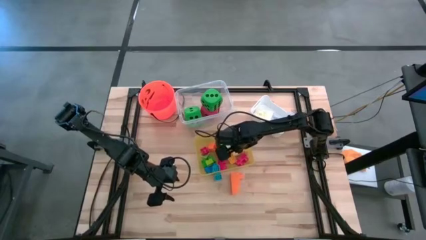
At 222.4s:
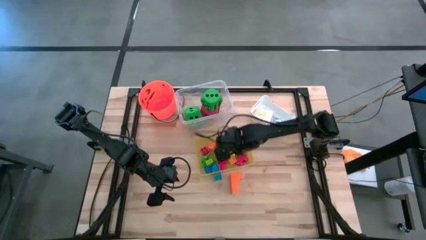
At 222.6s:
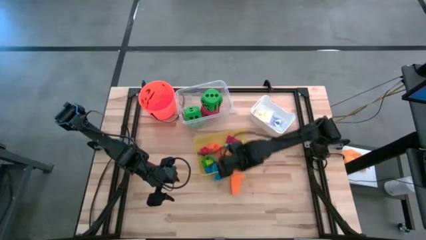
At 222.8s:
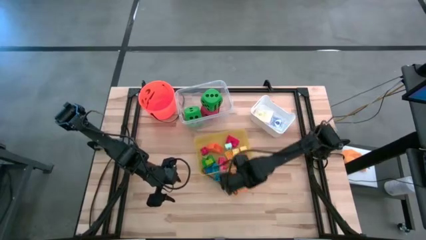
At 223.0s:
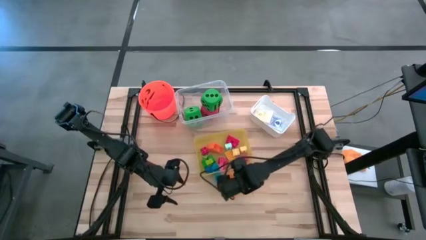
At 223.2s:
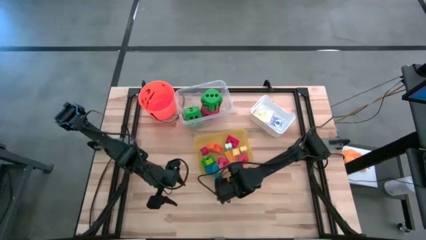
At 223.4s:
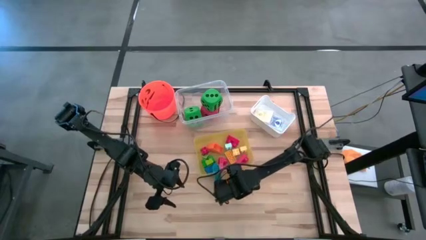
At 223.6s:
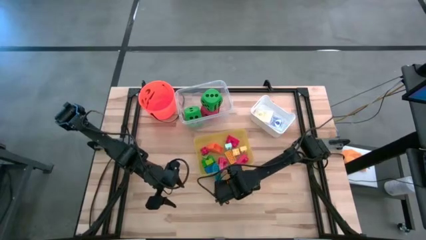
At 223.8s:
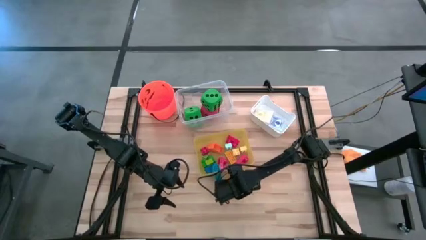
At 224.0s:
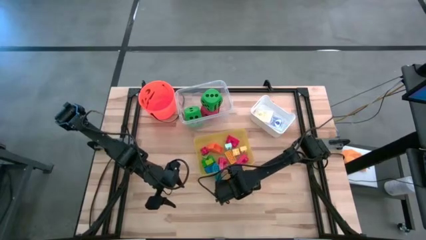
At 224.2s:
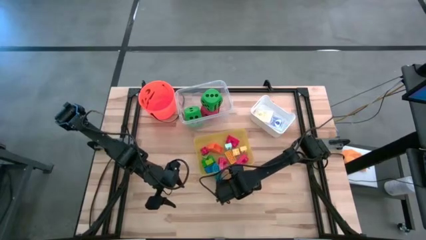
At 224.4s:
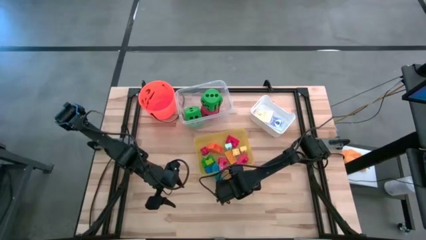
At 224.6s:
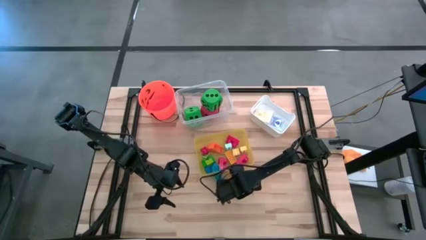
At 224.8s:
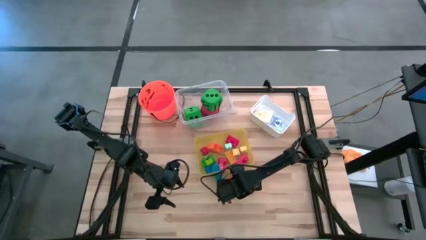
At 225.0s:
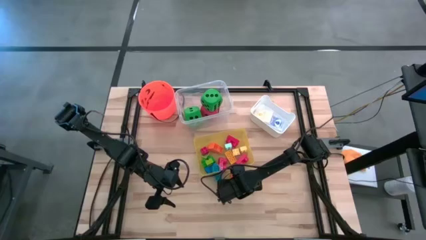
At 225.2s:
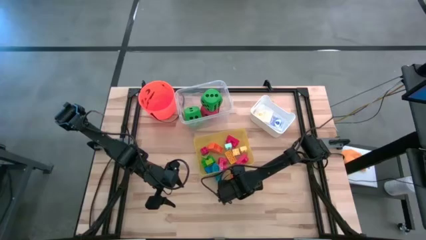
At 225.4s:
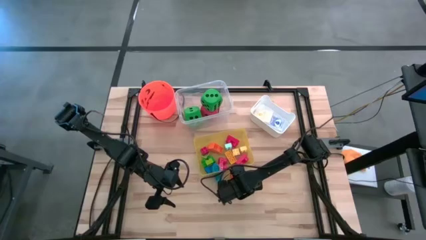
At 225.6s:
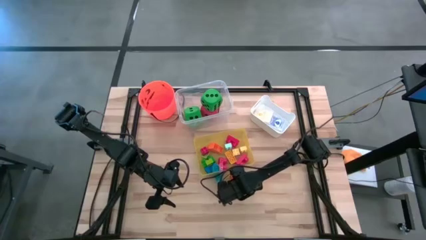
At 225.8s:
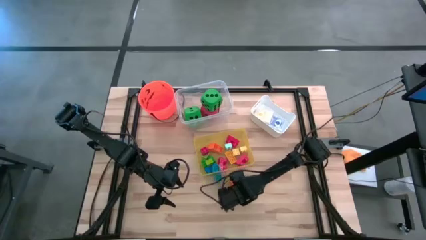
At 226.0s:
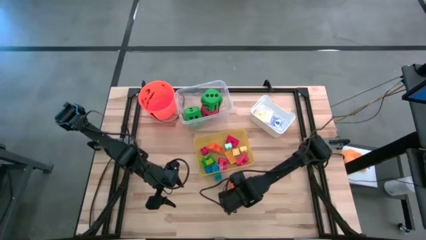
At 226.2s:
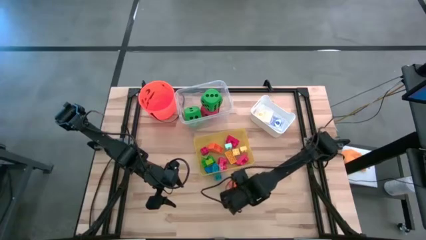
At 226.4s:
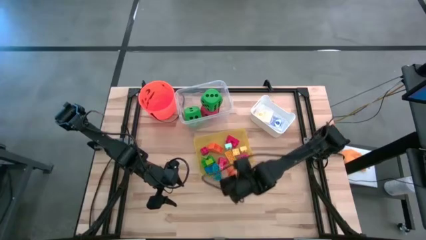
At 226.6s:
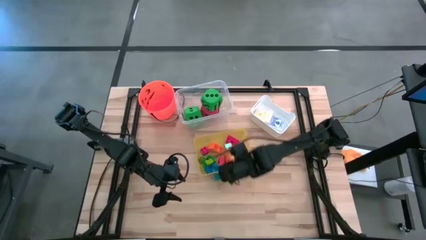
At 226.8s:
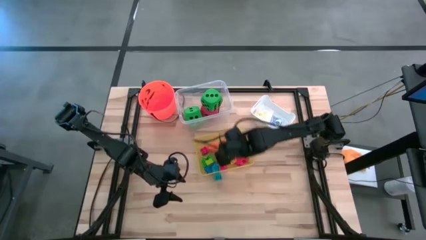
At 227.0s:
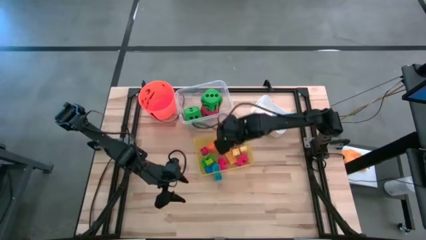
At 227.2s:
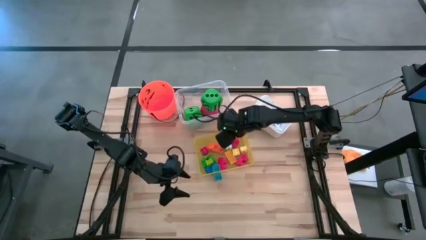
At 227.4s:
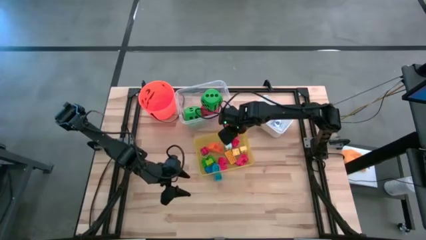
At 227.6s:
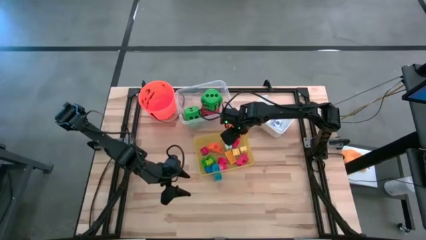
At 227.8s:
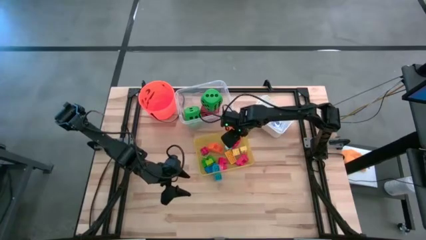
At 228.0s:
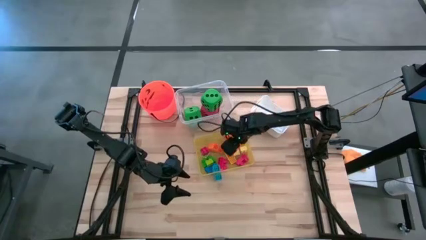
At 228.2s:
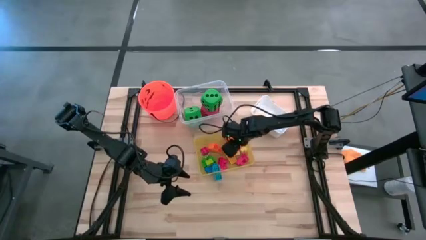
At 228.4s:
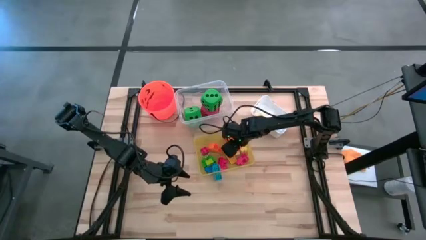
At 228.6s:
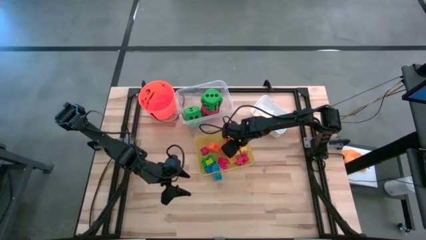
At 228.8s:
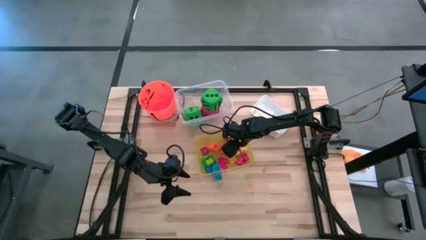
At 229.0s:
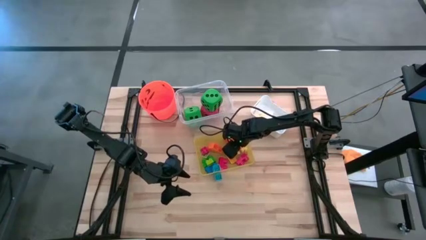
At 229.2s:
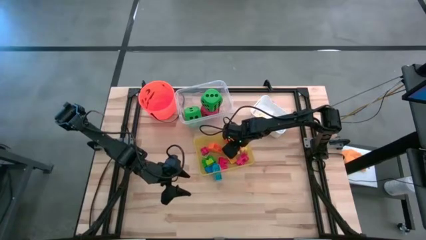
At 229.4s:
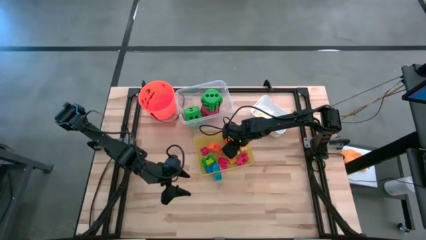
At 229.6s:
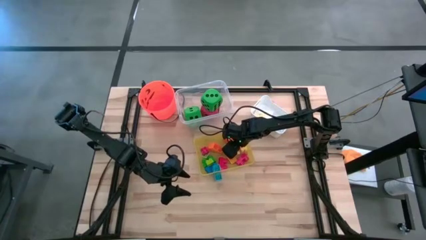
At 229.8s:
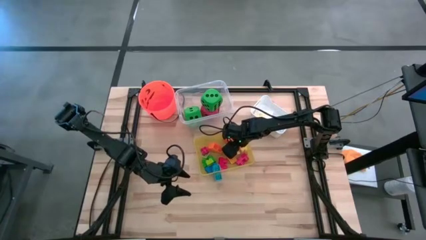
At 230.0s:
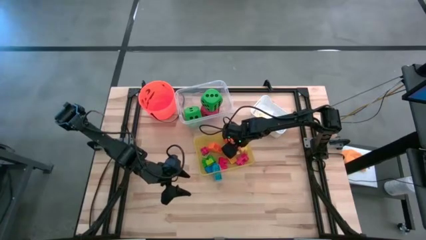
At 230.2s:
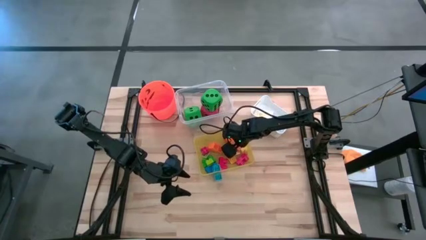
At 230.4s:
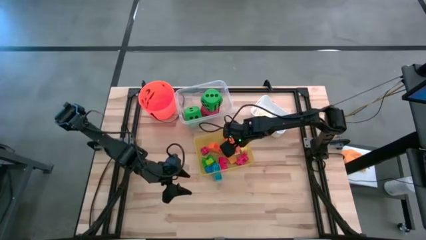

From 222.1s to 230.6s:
Task: Pick & Place Toys
Put the orange game piece into the yellow bin

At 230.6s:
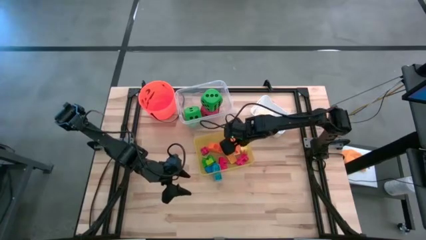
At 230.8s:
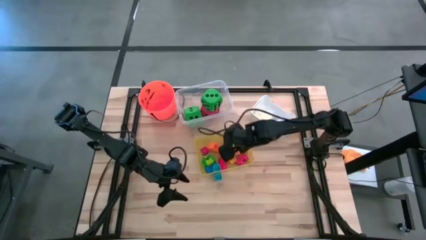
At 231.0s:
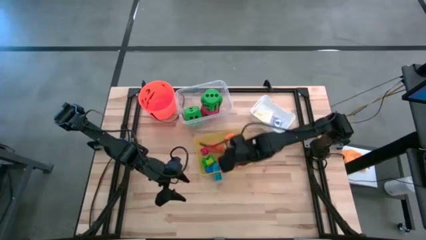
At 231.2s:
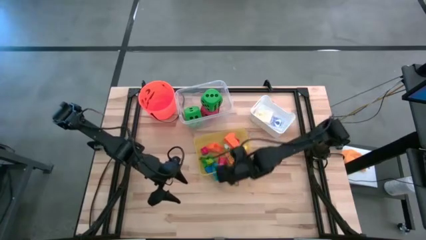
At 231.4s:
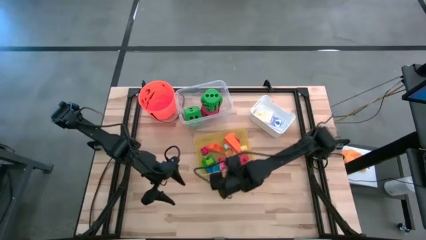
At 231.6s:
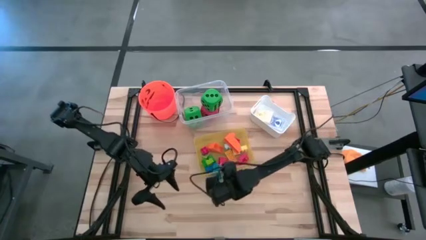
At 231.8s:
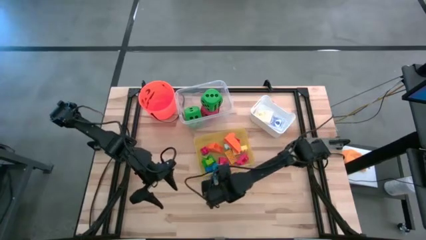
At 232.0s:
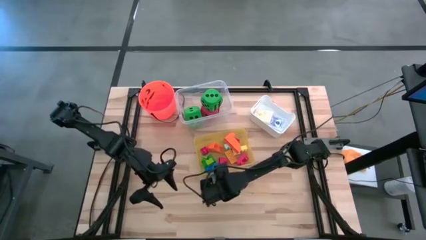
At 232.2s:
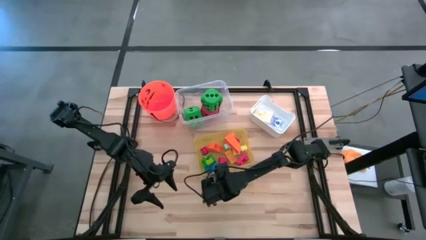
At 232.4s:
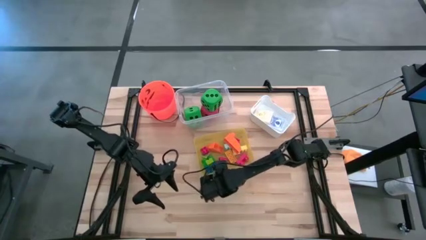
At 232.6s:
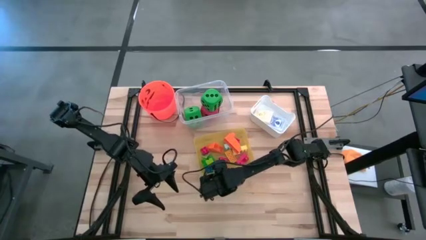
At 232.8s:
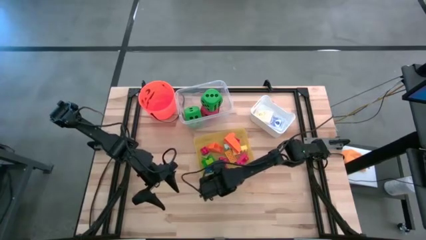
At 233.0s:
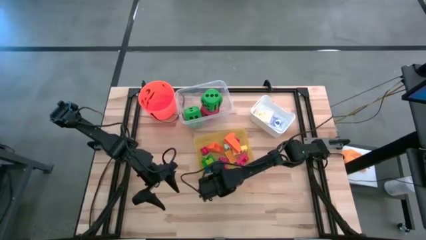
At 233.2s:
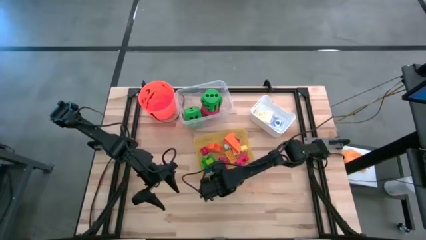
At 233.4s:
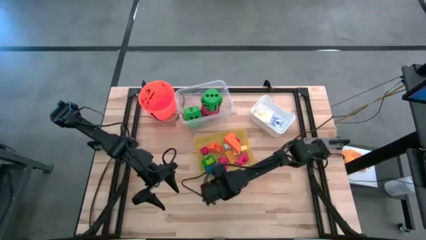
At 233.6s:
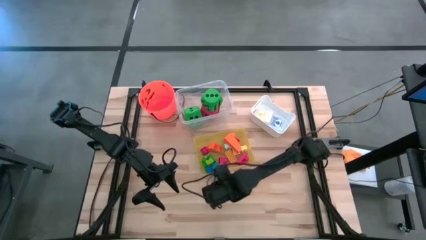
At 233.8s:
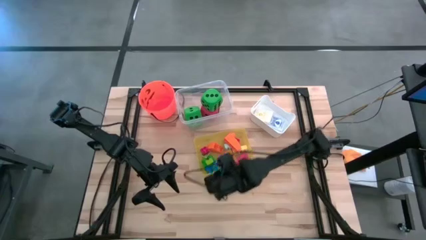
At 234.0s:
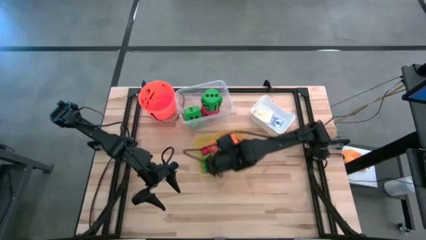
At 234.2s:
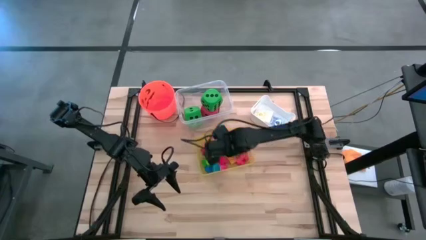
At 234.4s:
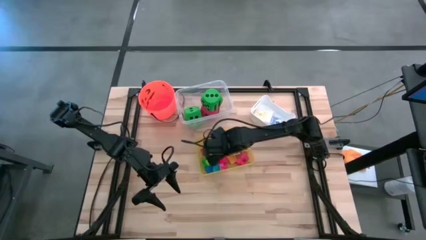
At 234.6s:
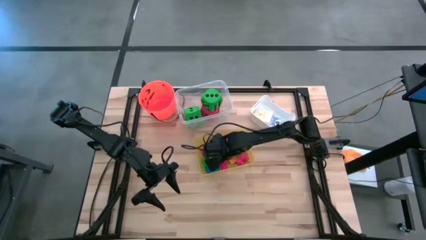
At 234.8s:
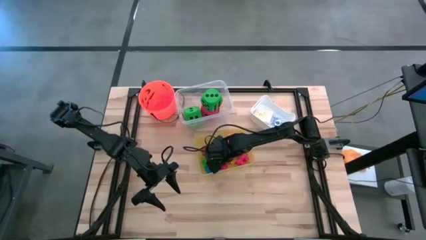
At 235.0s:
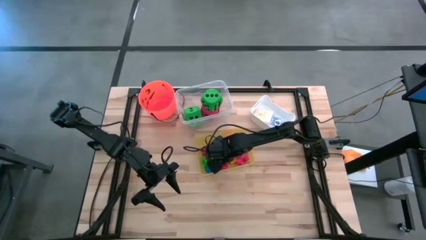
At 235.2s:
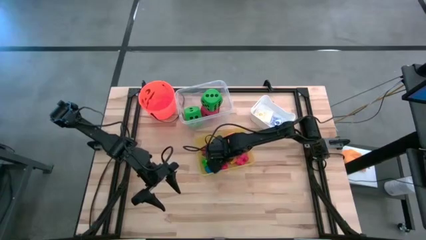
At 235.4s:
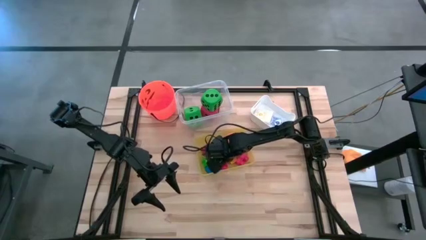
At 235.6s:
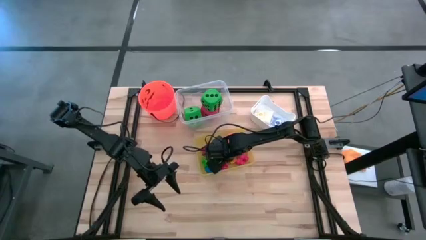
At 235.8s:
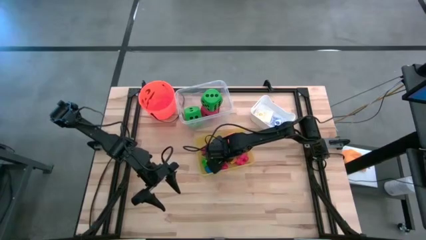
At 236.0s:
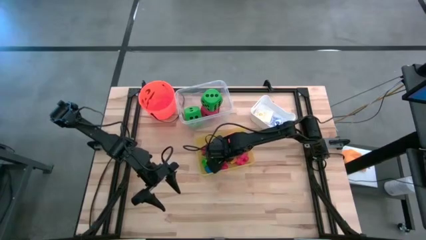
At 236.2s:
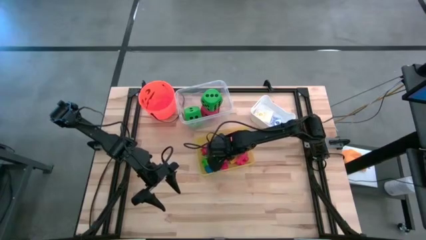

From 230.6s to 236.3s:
Put the blue game piece into the yellow bin

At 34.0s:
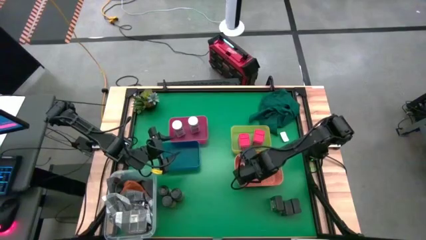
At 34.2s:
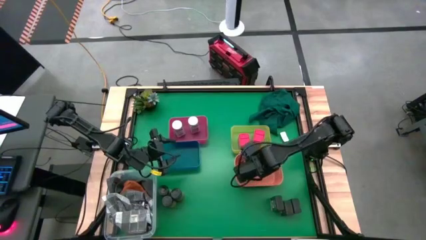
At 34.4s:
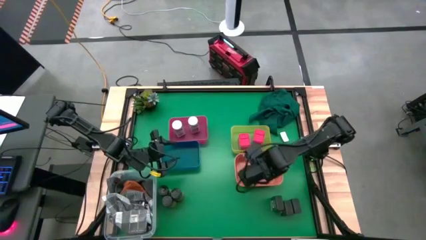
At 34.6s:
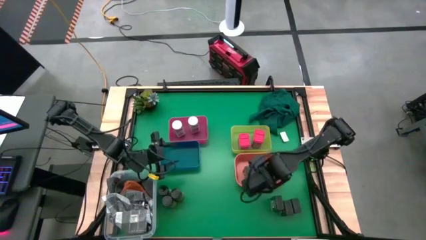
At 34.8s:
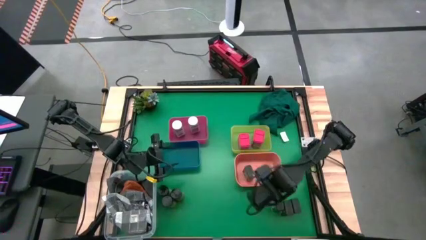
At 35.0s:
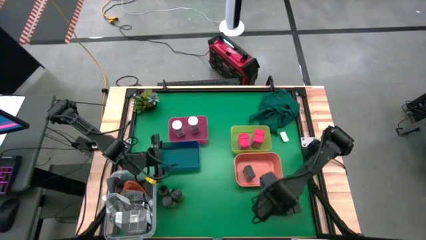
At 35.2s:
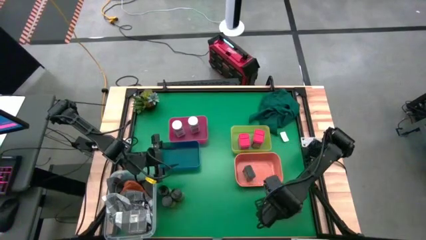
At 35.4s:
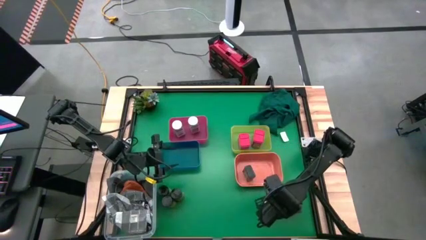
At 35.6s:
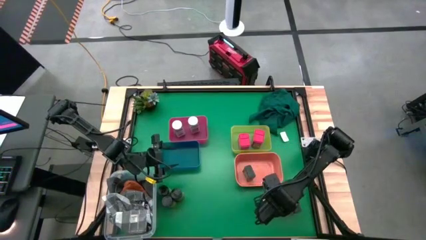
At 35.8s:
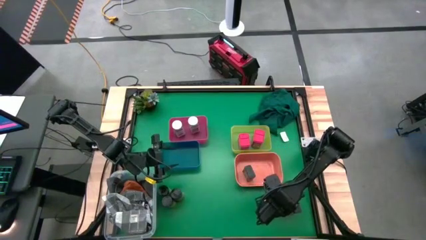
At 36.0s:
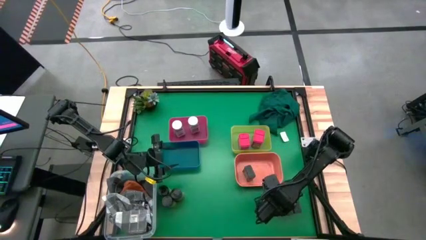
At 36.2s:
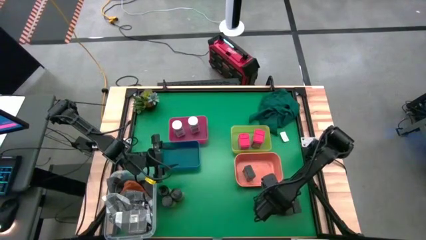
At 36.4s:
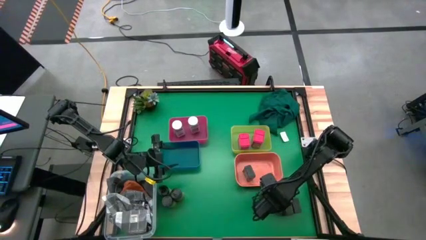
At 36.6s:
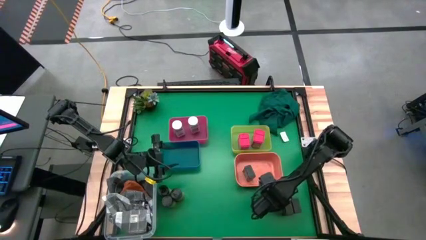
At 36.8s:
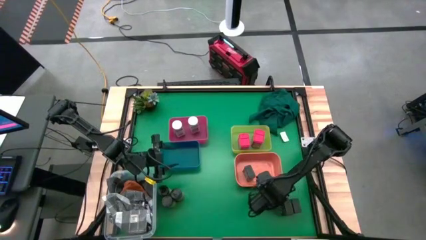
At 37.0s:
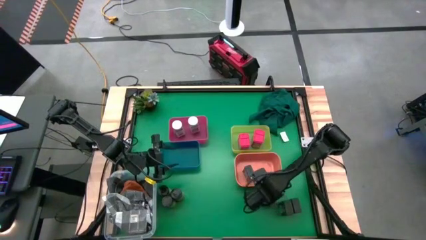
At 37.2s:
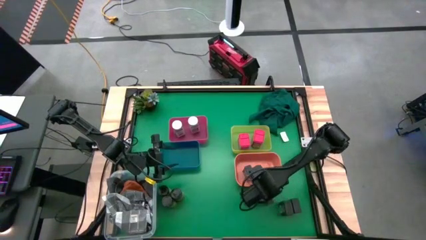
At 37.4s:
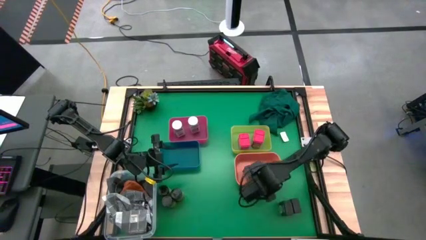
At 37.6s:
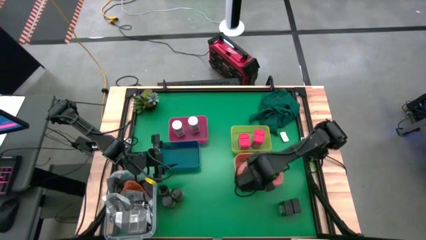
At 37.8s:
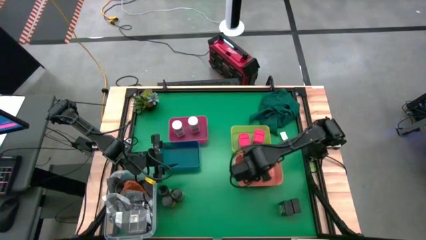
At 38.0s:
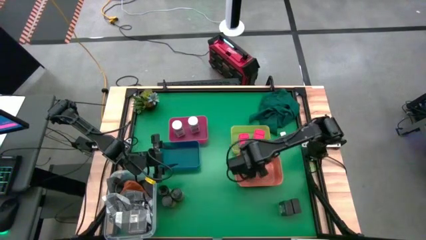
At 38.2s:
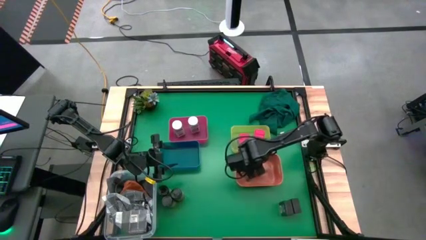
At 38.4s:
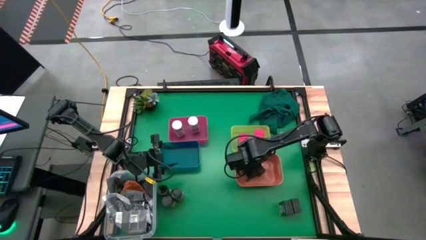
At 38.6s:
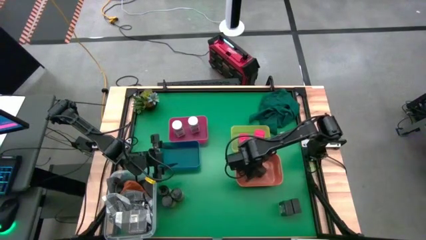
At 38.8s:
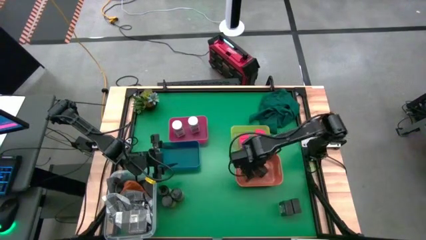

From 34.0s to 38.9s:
Task: Sort spices by type
Put the left black seasoning can into the orange bin
